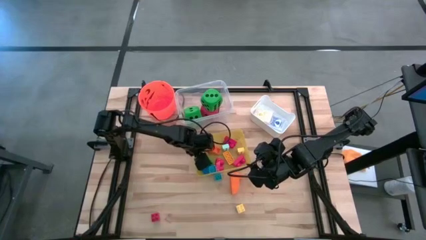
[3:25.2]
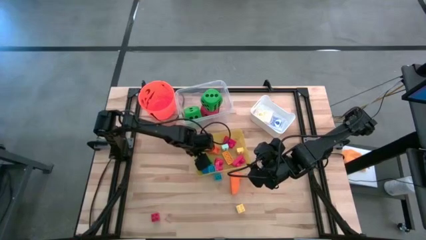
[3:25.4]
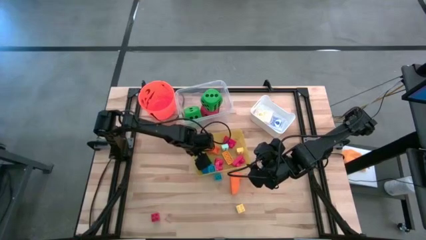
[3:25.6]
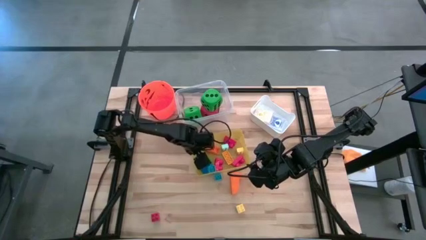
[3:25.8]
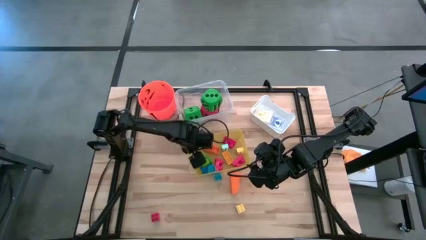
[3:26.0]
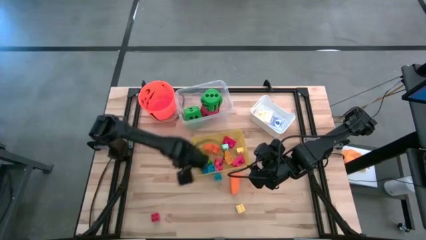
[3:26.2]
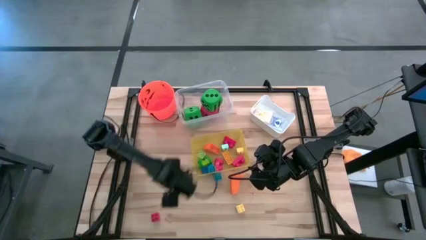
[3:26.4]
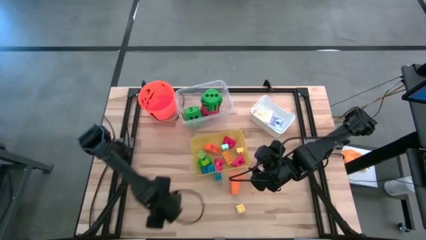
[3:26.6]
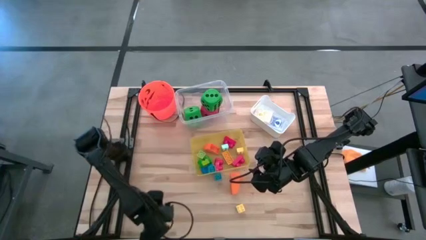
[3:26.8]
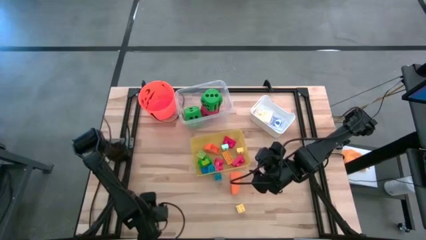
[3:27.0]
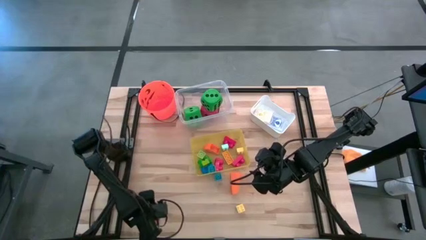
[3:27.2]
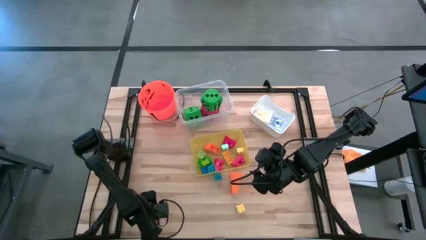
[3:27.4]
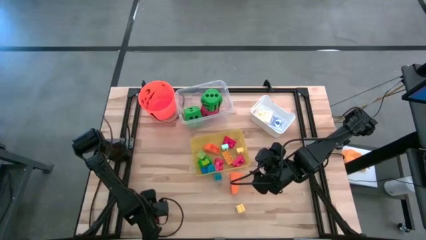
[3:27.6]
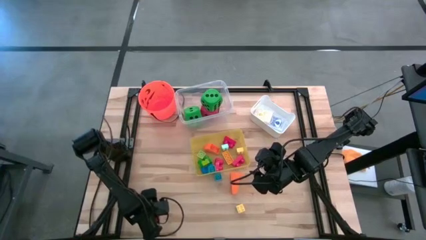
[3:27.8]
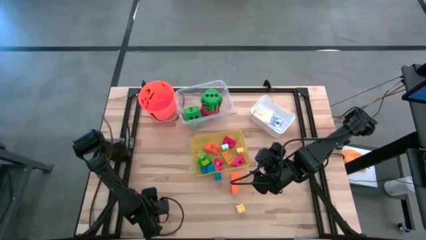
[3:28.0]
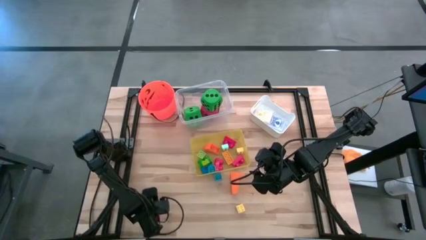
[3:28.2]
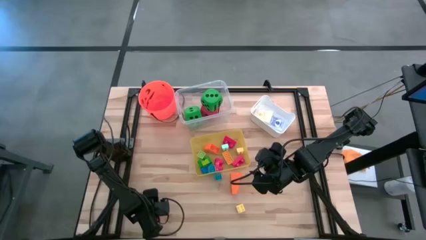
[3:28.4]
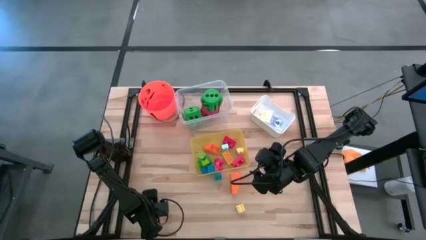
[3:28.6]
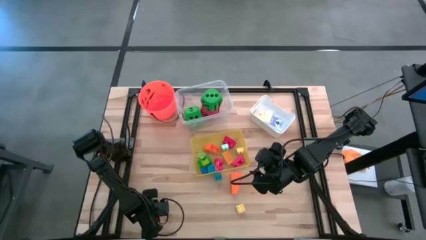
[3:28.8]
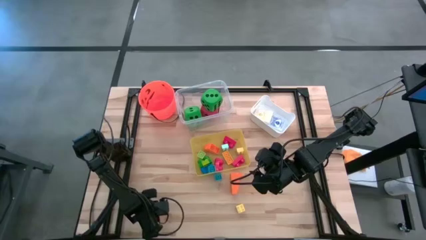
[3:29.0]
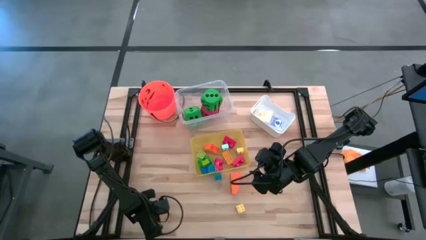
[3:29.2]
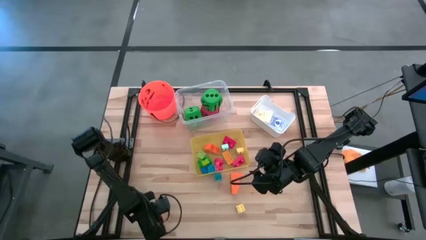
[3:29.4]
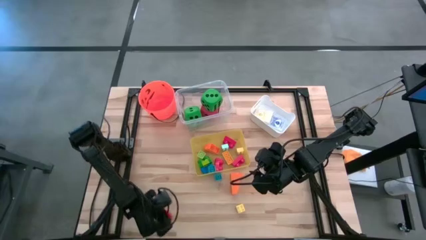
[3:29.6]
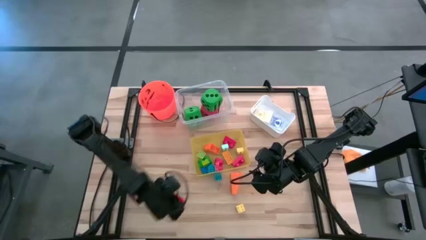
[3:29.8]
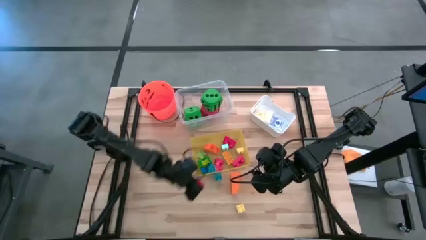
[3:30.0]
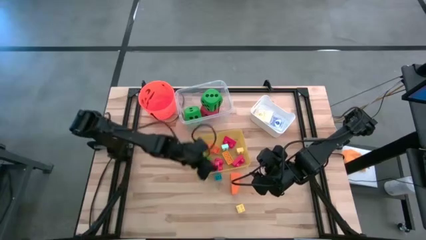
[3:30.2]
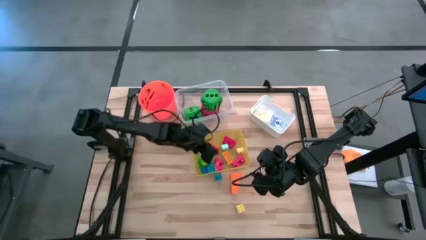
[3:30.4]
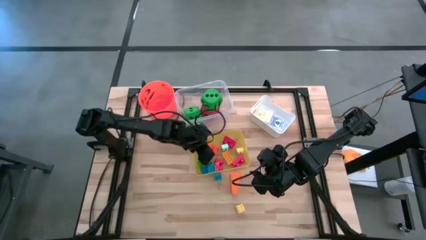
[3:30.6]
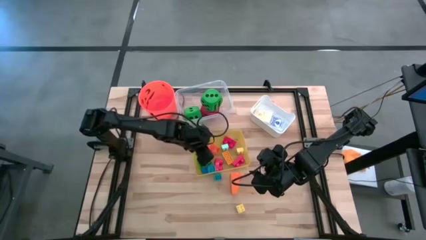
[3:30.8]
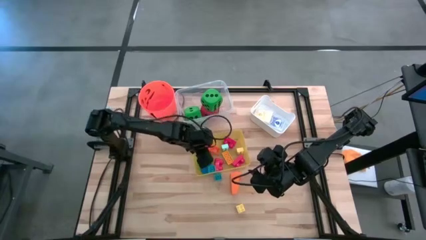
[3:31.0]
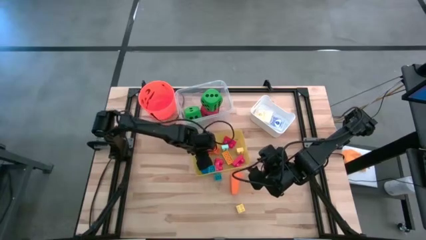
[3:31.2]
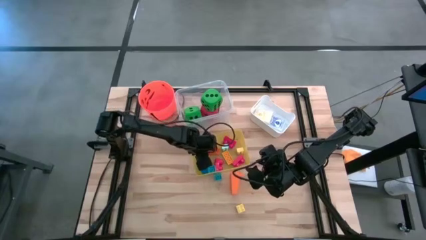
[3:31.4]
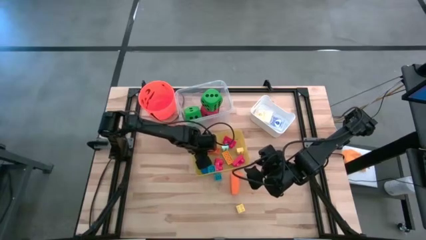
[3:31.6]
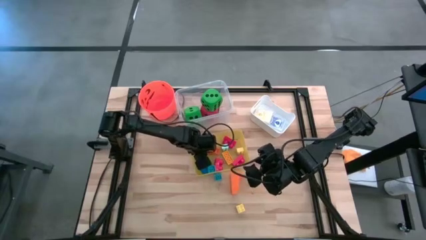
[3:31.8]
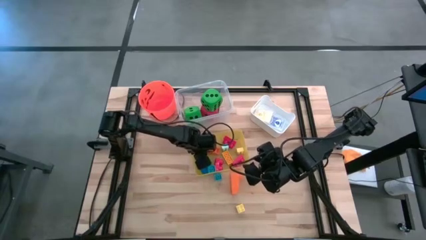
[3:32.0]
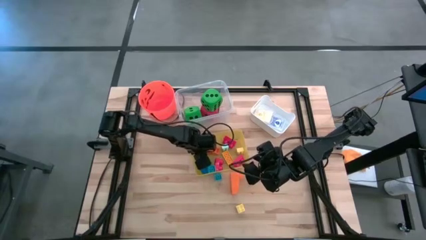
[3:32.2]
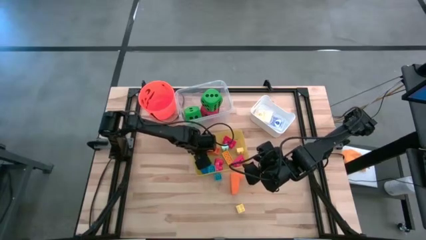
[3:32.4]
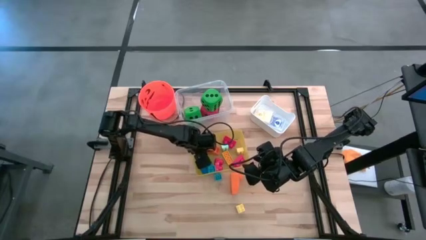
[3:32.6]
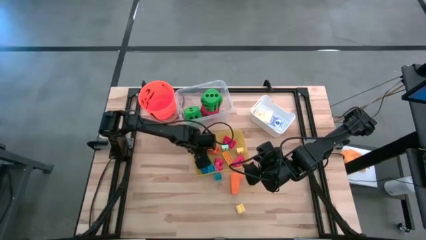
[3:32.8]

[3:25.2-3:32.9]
Task: Pick & Place Toys
Put the red game piece into the yellow bin

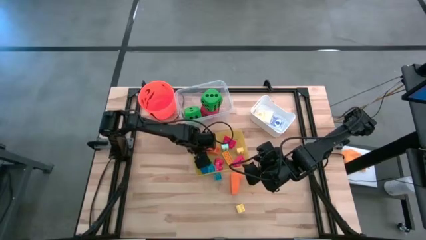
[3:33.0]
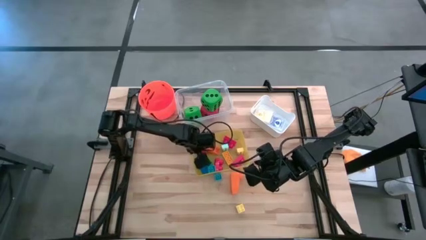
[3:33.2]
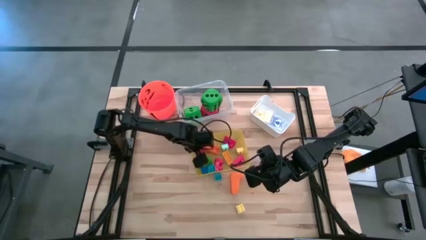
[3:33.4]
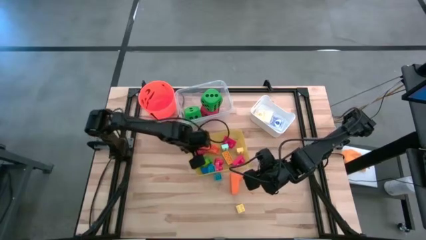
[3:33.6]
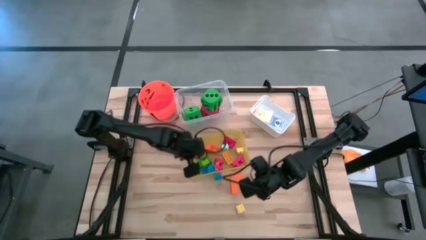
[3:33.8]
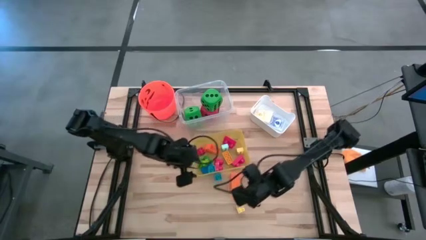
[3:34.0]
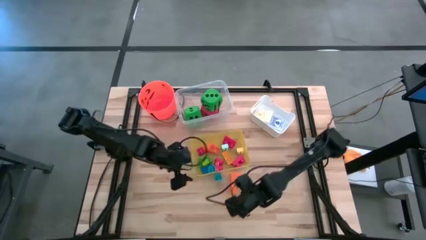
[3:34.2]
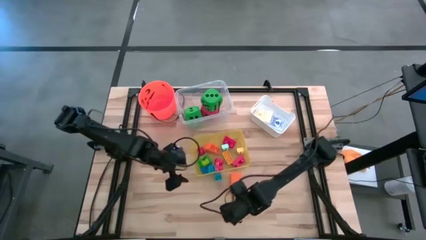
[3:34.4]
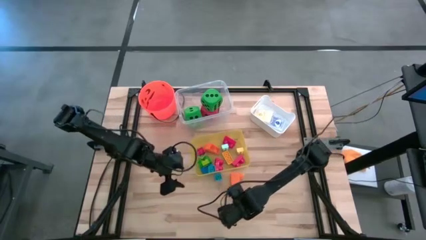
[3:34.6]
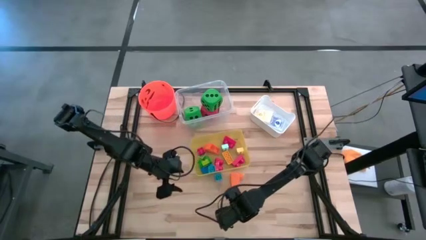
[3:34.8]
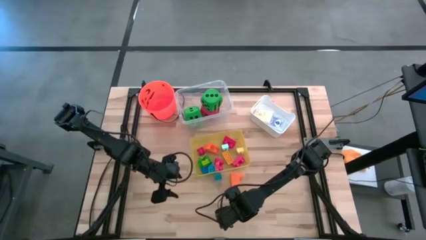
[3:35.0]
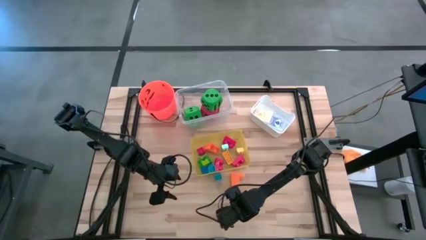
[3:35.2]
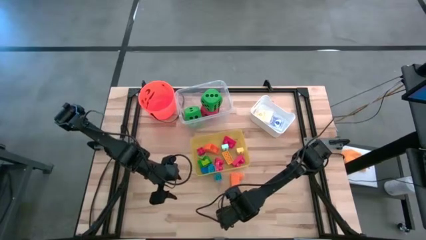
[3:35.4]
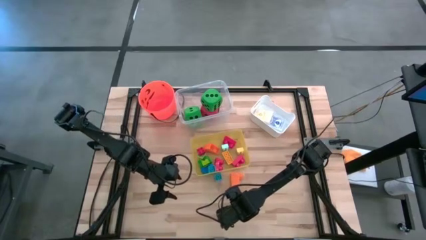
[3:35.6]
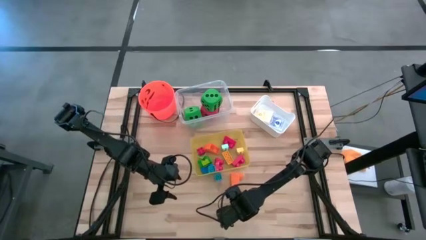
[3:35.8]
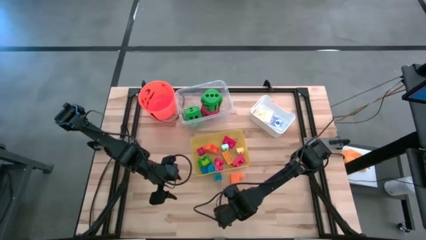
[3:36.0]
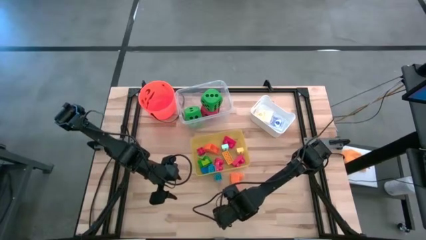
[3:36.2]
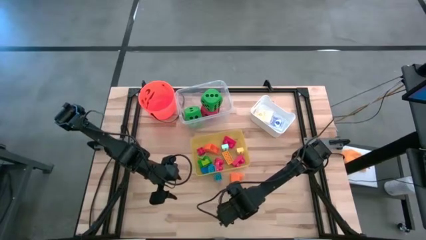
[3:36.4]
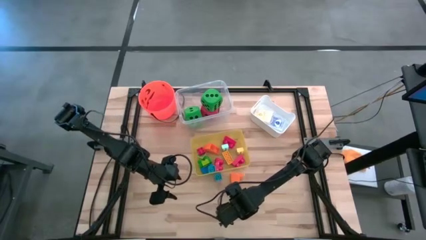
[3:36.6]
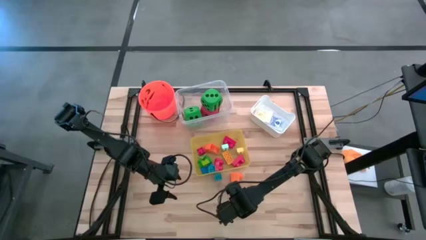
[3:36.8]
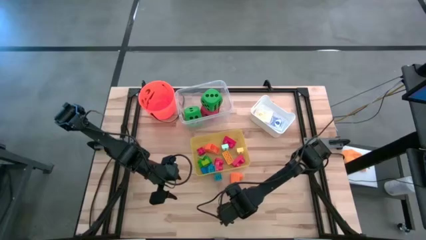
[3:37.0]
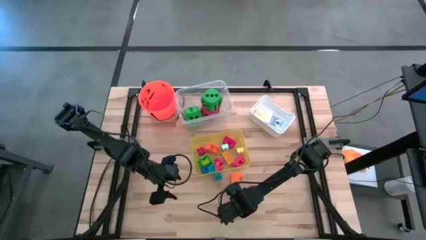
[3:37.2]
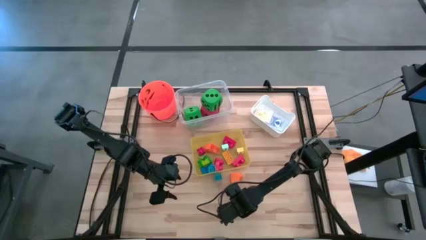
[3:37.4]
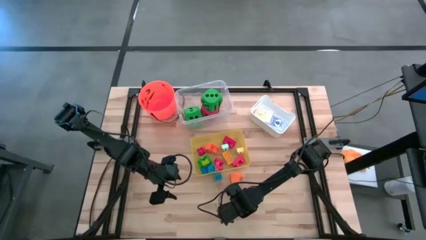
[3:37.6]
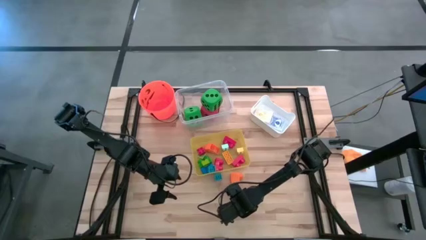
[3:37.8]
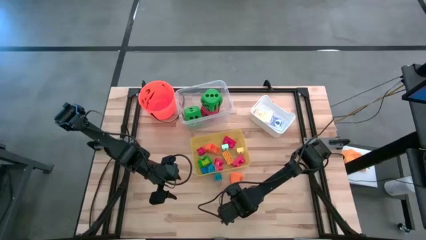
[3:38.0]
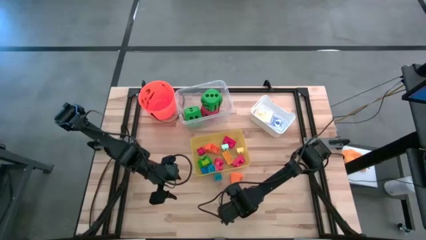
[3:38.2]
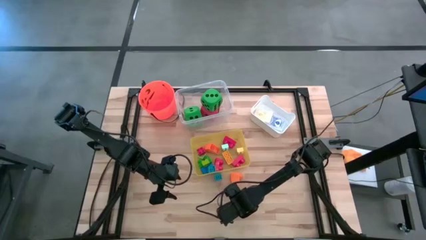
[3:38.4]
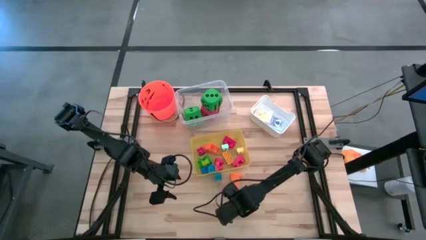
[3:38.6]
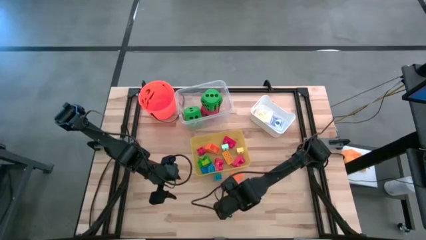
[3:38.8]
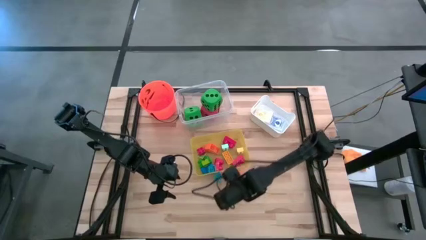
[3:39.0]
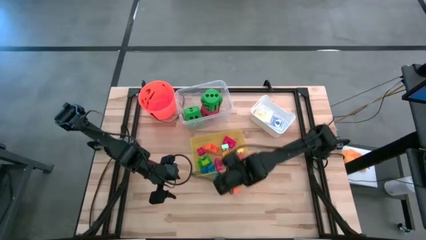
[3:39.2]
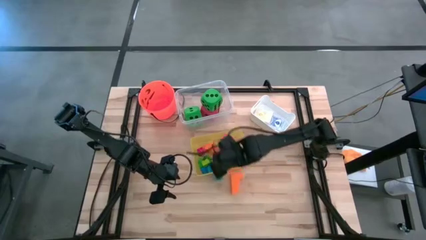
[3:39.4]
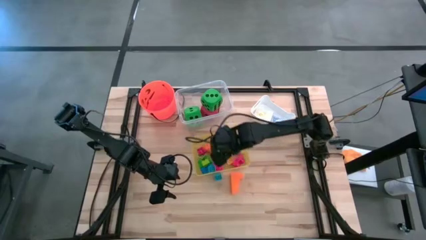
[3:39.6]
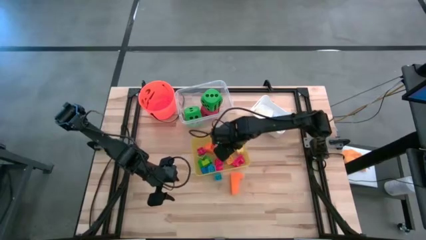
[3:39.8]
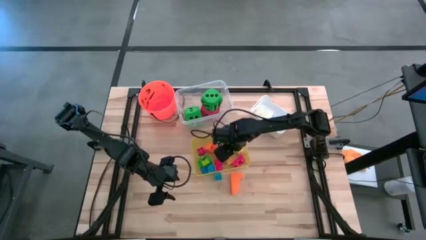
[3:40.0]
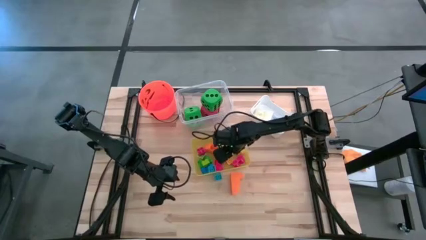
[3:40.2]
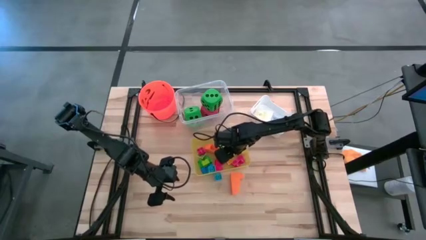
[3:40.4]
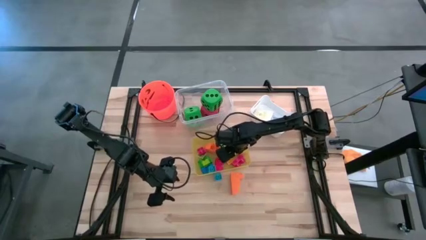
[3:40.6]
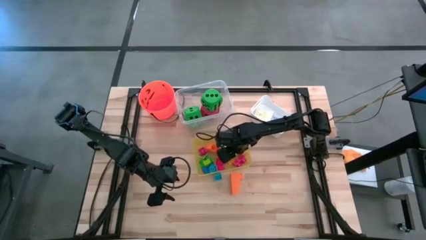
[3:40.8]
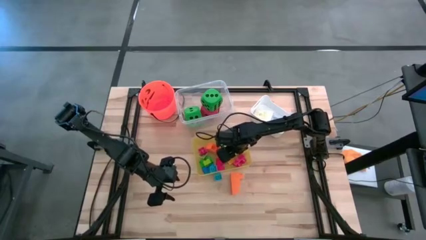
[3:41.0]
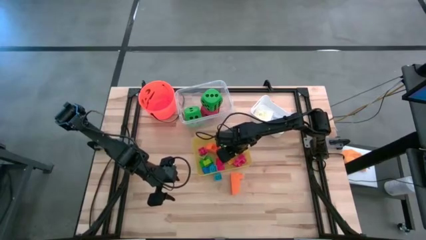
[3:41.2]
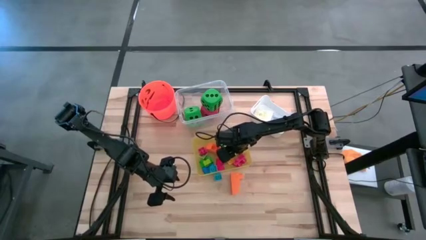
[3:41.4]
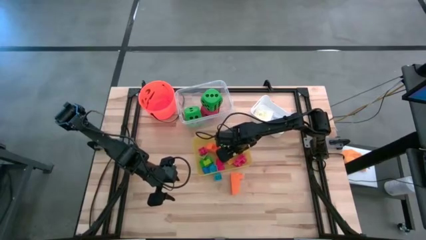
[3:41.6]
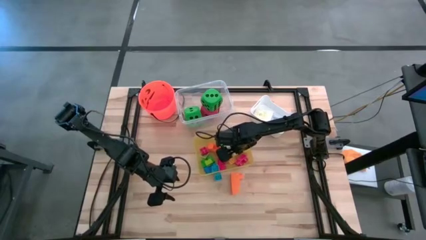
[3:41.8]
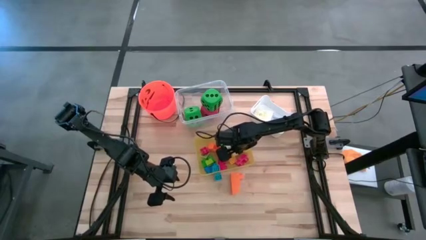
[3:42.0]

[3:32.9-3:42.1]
Put the light yellow game piece into the yellow bin
